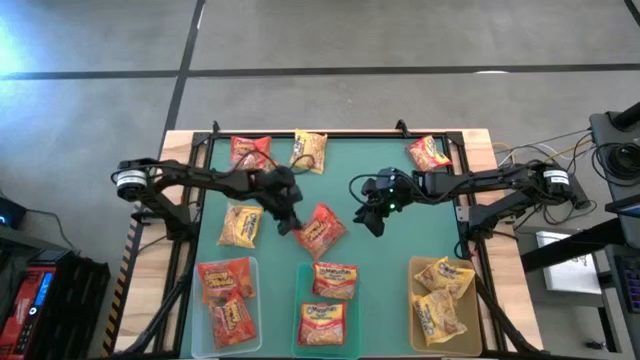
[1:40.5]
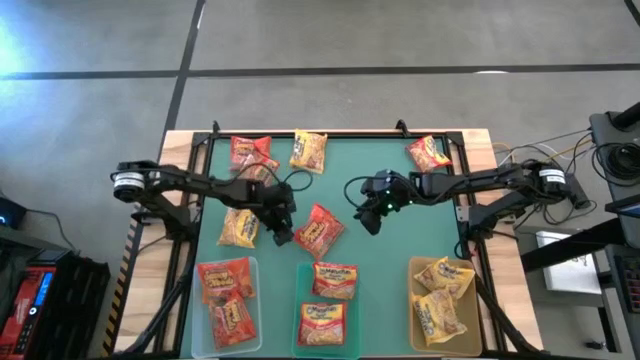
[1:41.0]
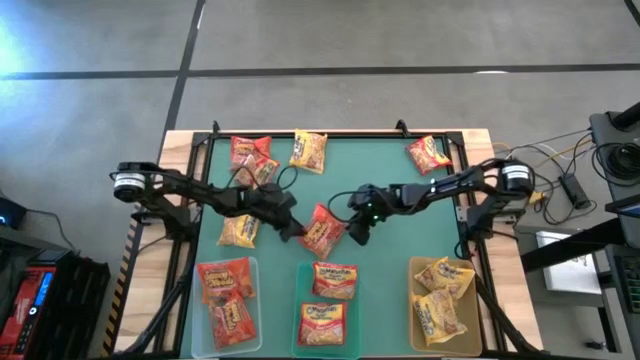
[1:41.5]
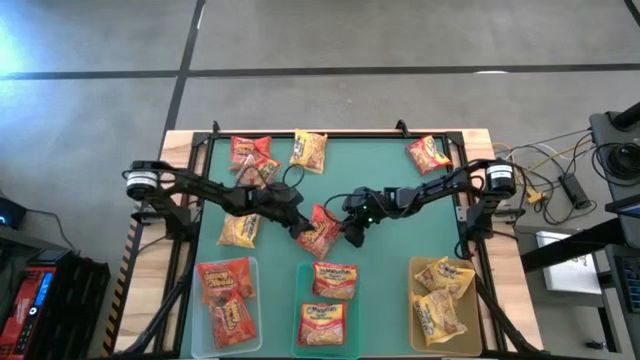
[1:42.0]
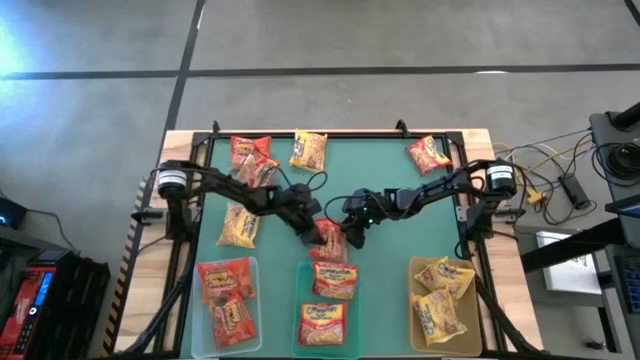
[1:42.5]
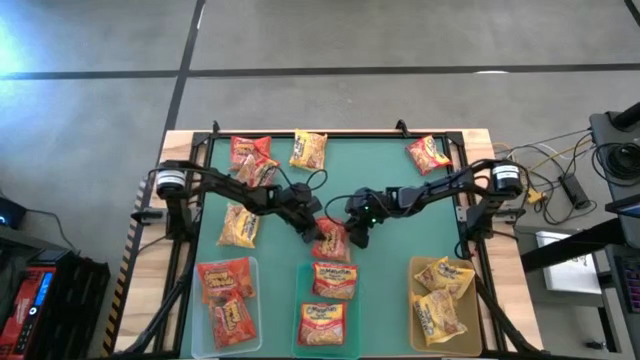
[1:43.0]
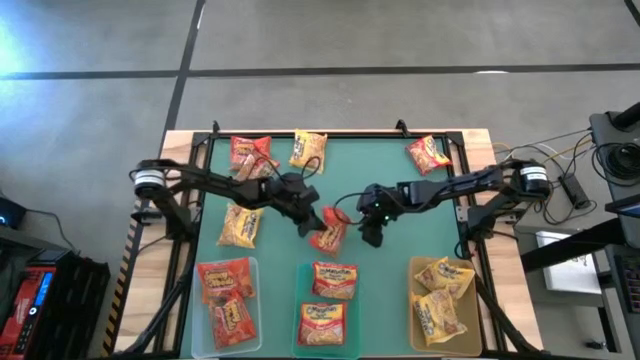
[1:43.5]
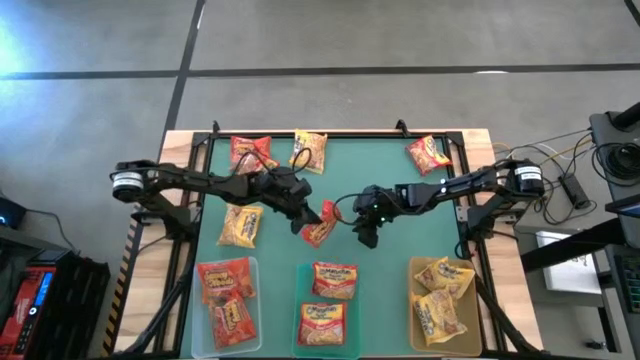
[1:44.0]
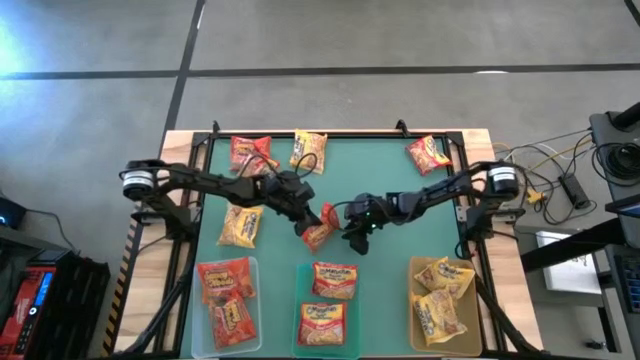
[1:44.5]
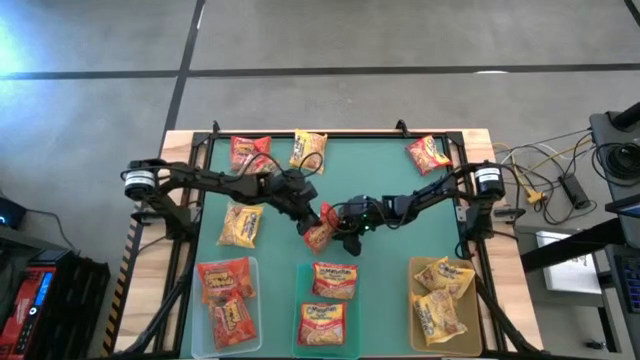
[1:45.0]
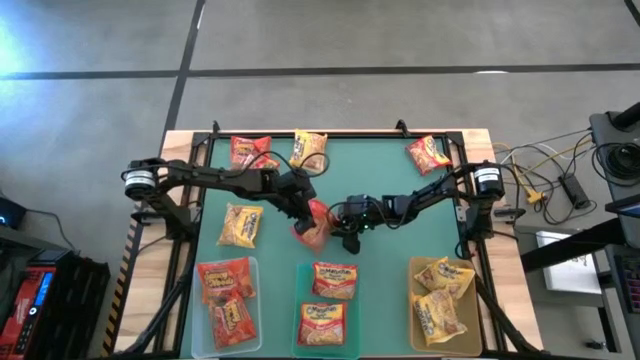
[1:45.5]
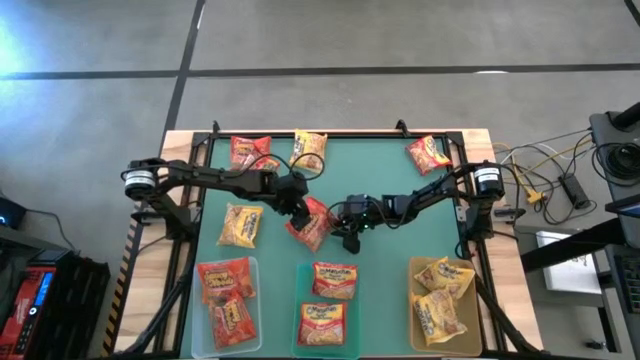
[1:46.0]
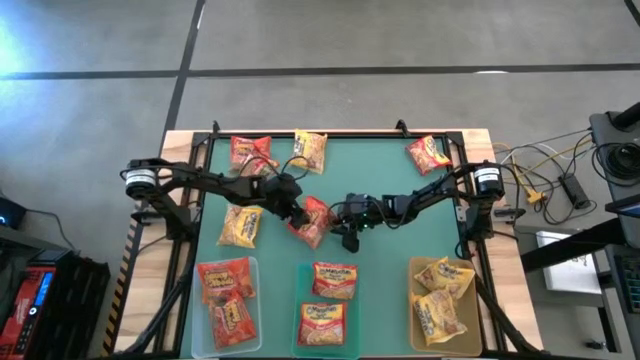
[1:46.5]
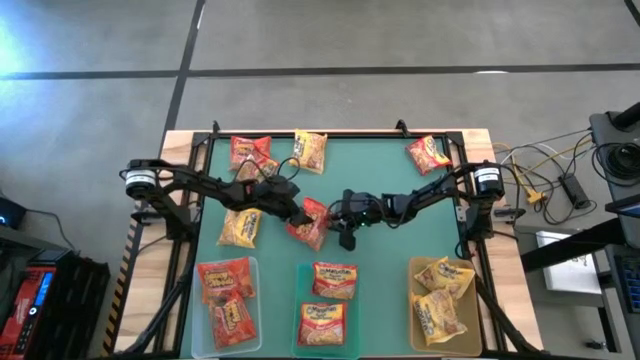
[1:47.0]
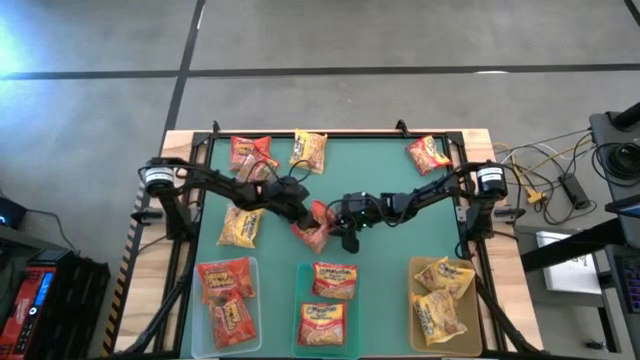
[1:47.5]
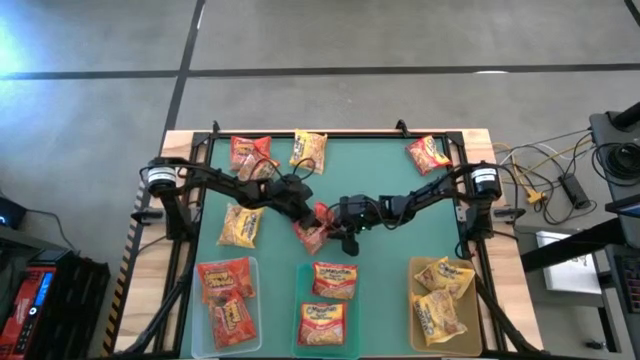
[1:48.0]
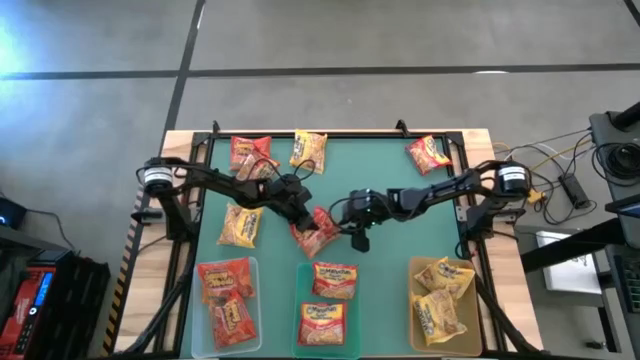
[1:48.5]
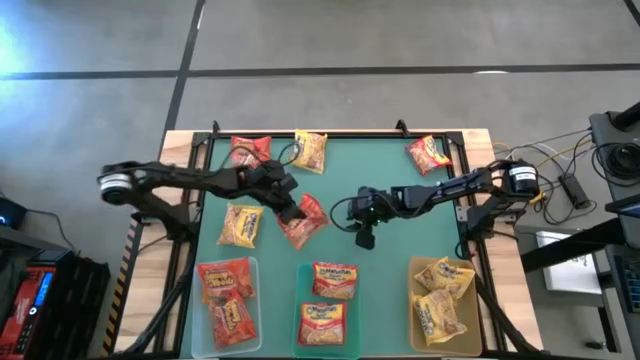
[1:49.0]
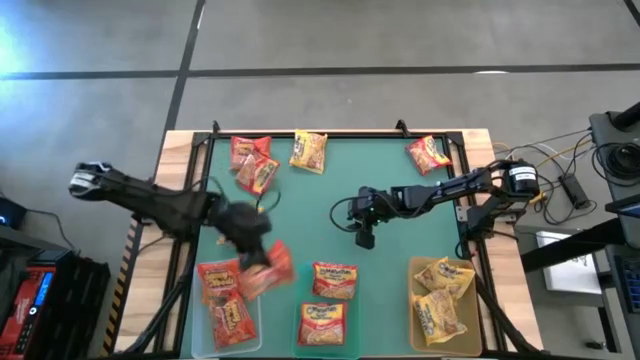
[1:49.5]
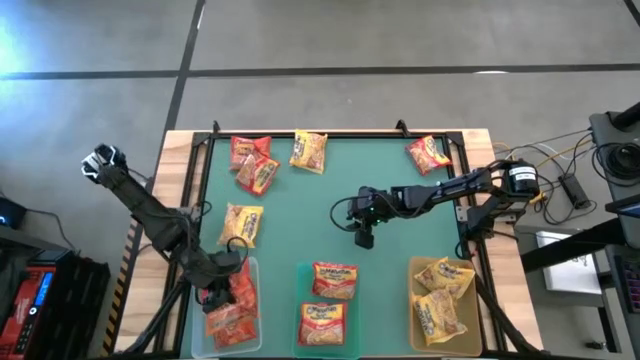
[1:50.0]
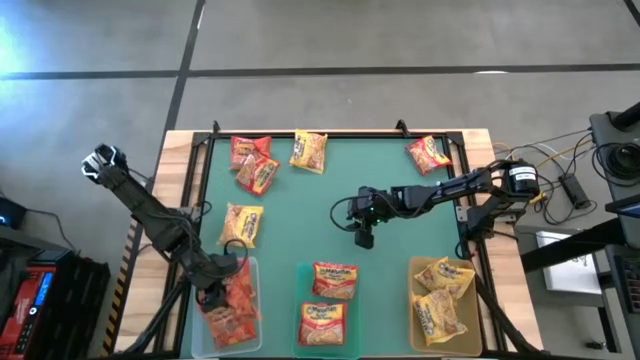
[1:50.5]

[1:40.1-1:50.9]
Task: Sort Maruchan noodles
Put the orange noodle pack into the transparent bin

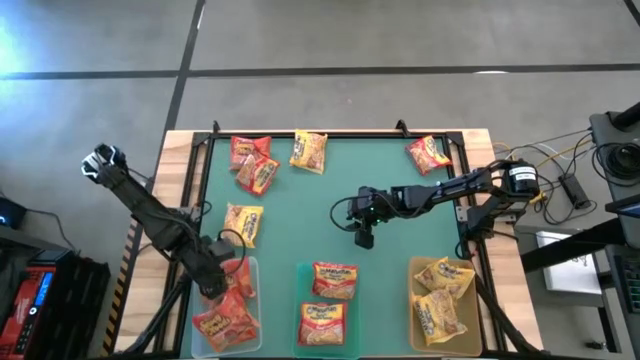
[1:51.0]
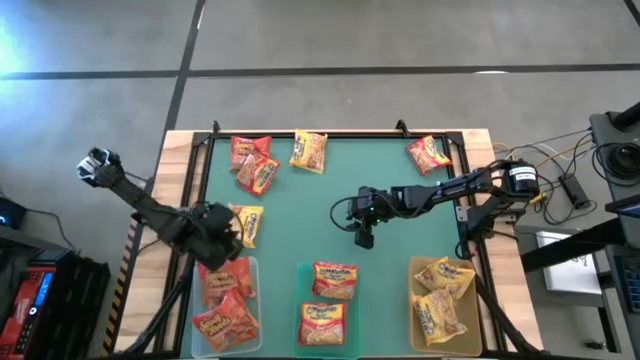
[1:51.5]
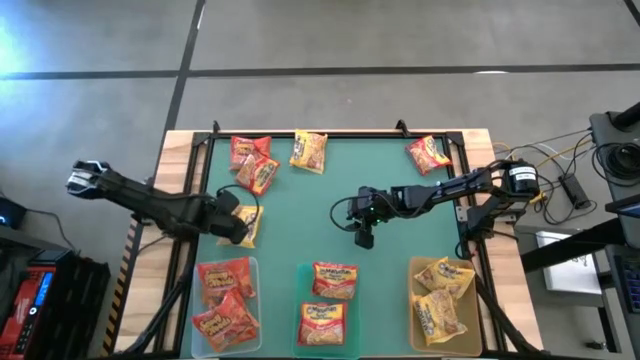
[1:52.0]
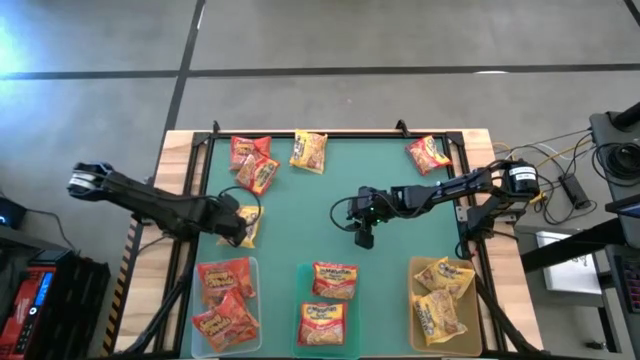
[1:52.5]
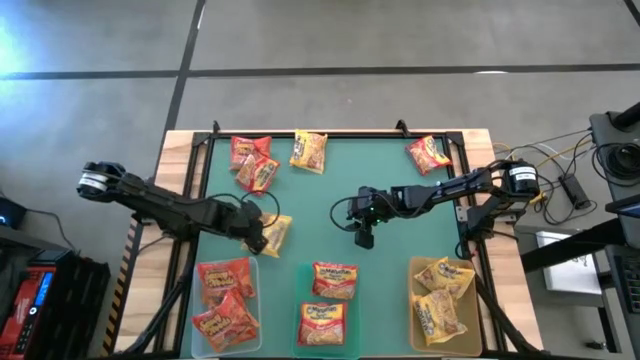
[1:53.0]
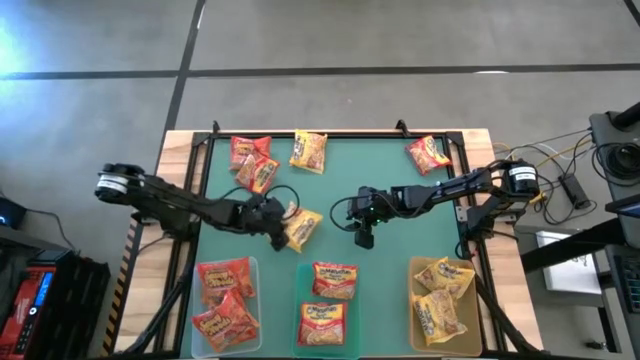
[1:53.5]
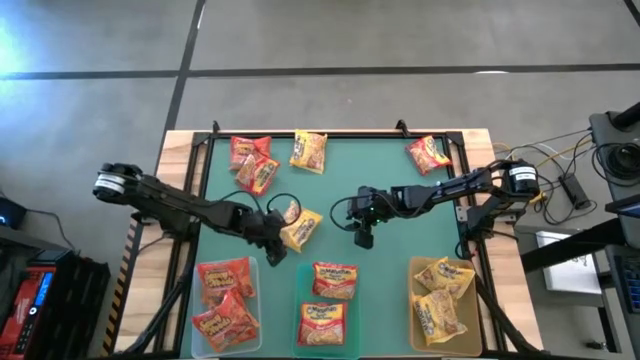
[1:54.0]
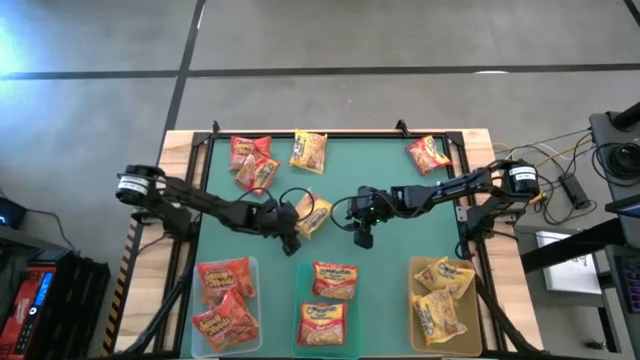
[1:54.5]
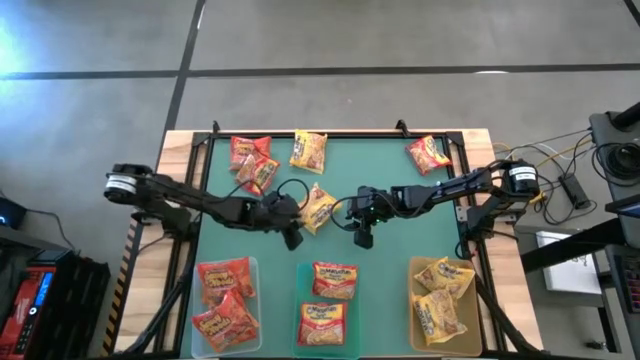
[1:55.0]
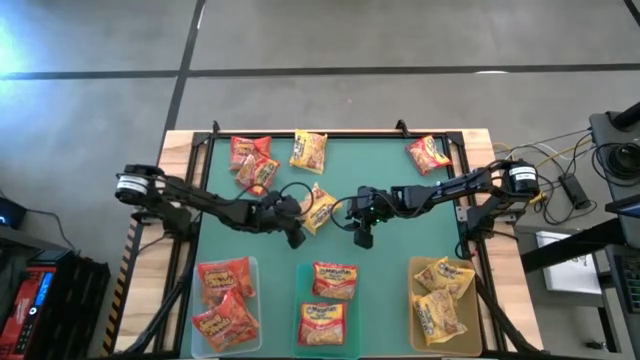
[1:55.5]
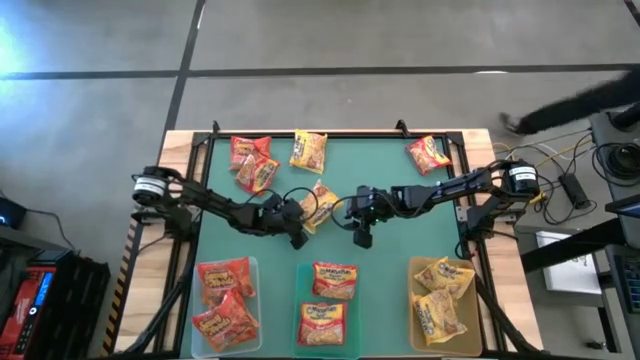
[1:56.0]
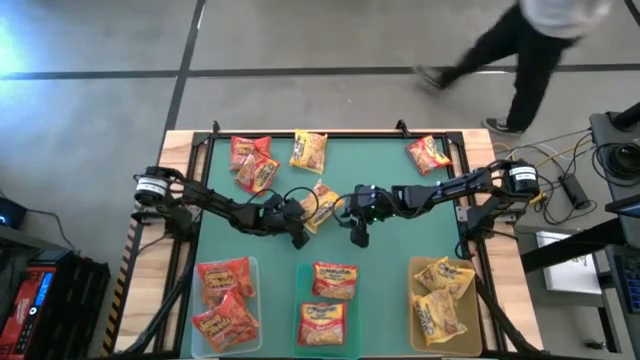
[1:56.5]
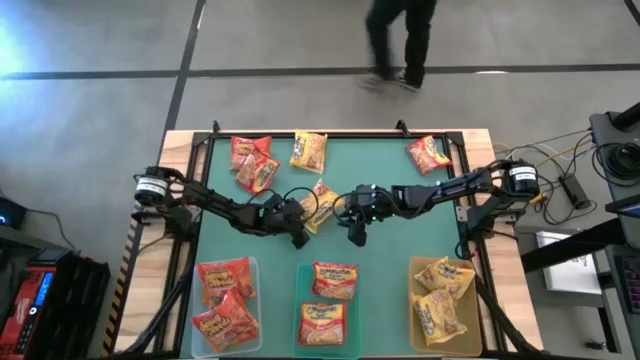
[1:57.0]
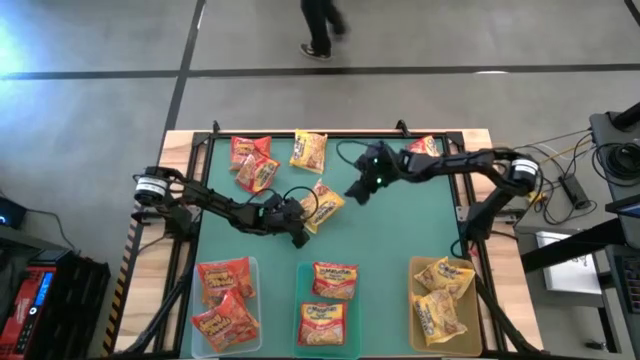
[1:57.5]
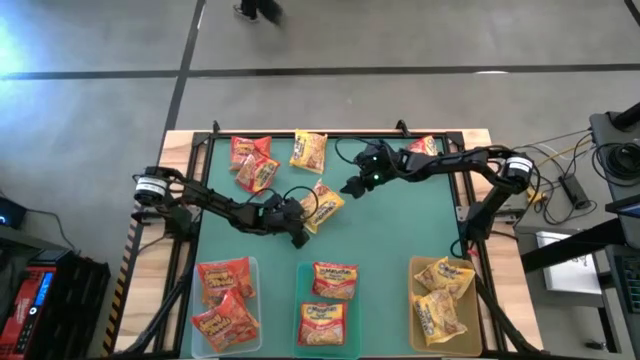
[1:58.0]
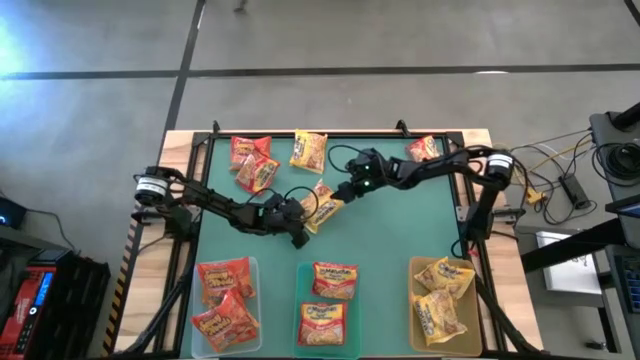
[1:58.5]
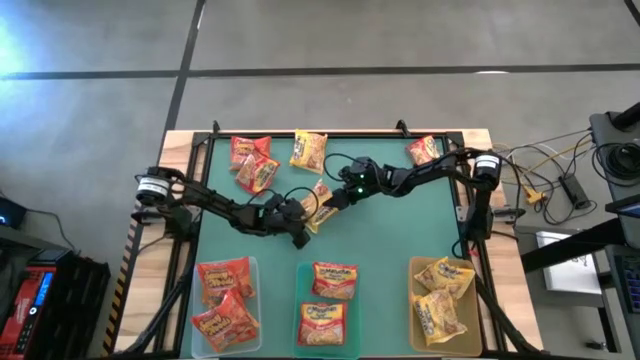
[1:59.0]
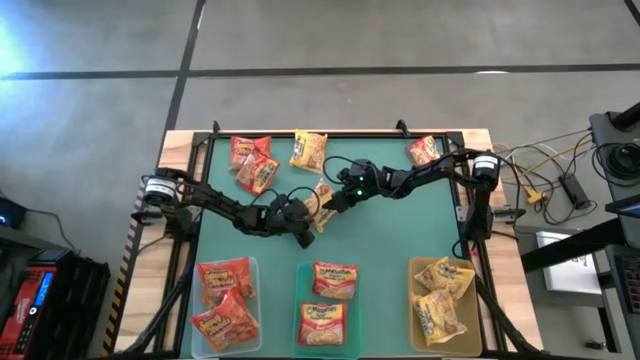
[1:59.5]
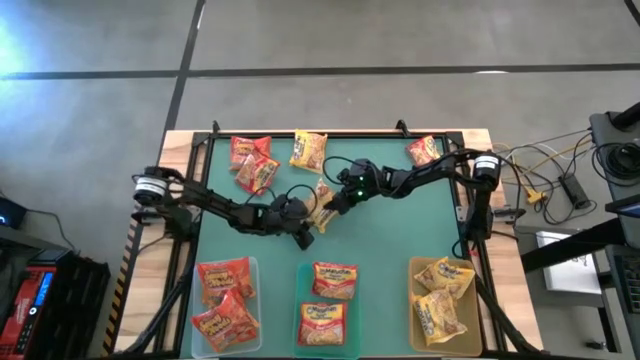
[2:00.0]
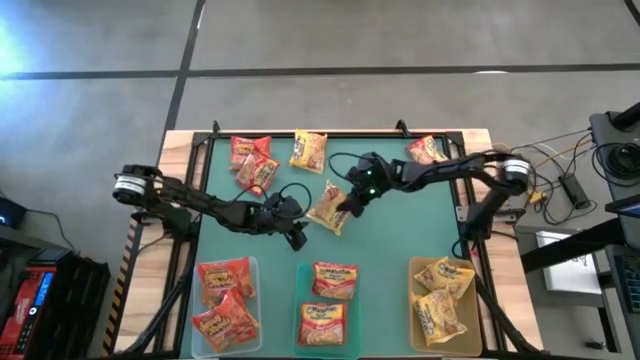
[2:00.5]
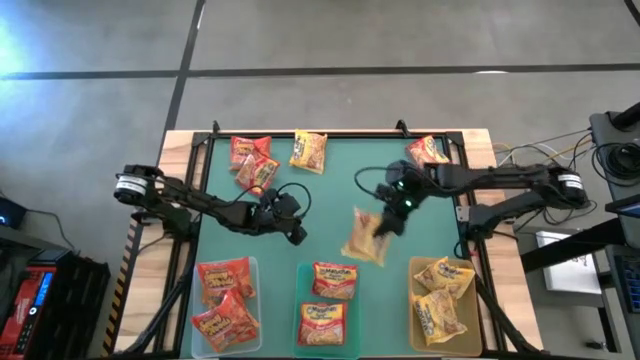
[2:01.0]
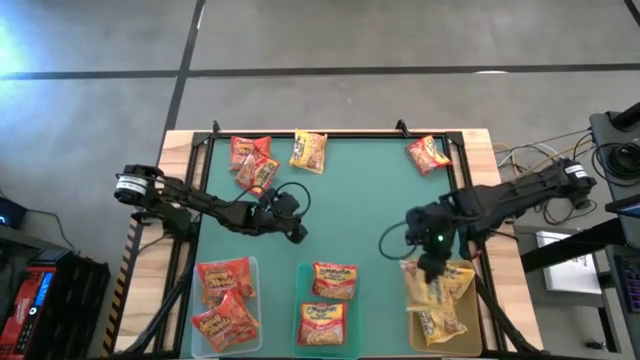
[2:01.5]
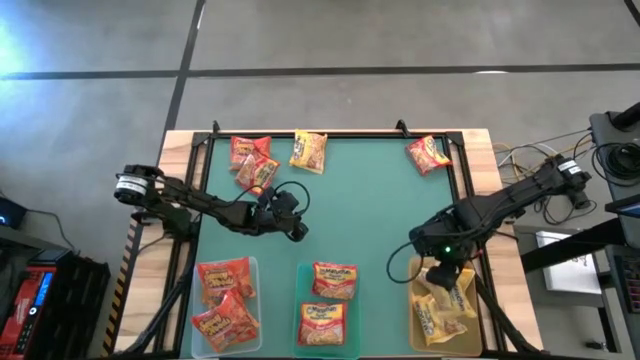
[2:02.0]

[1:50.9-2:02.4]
Put the yellow noodle pack into the orange bin
